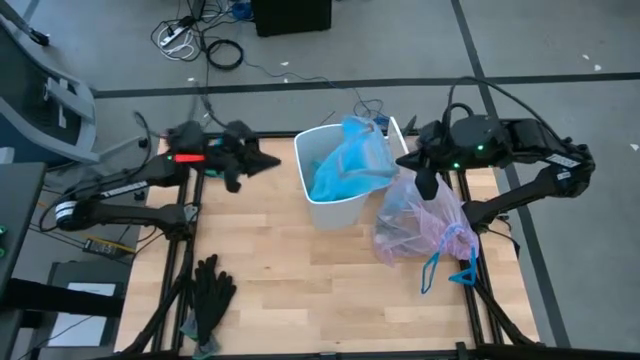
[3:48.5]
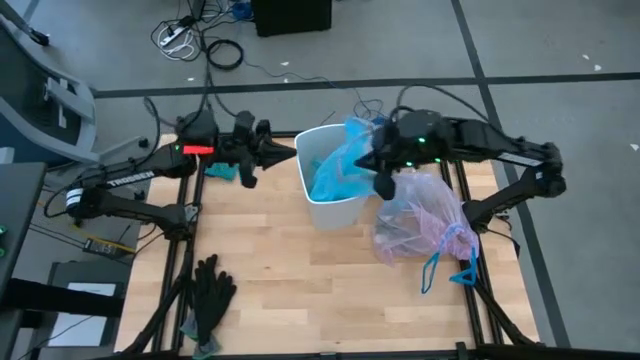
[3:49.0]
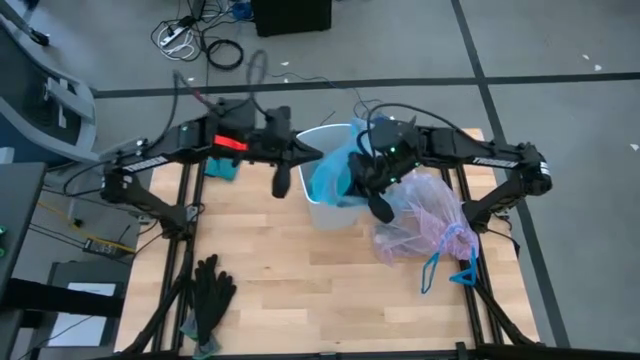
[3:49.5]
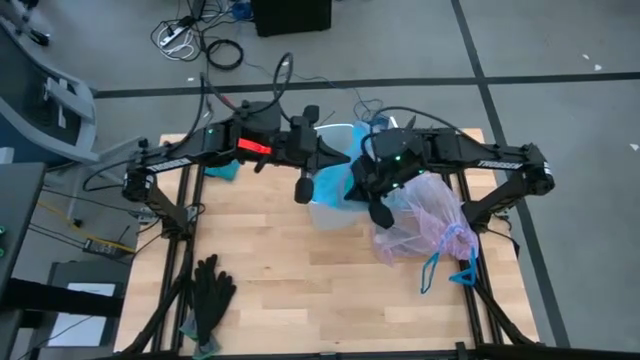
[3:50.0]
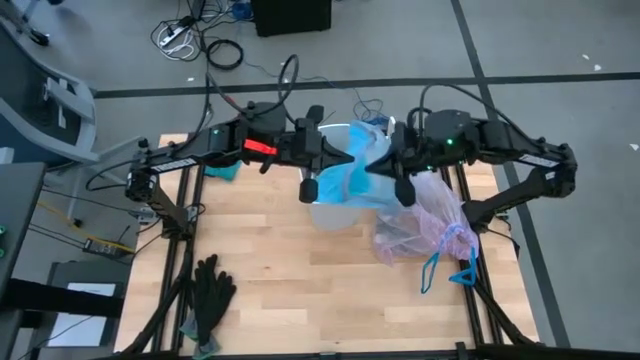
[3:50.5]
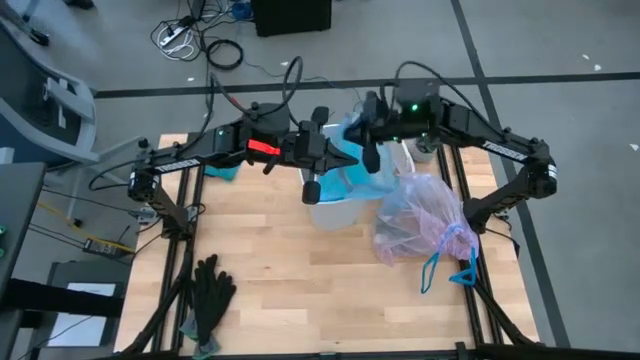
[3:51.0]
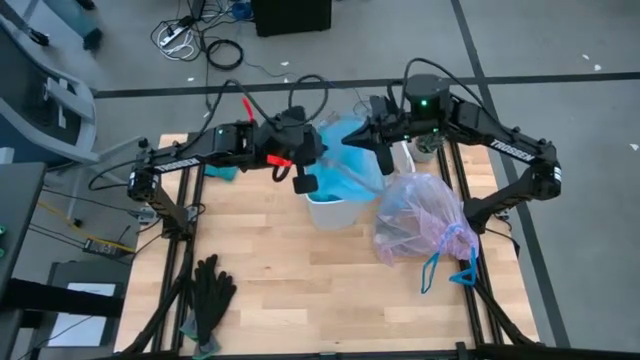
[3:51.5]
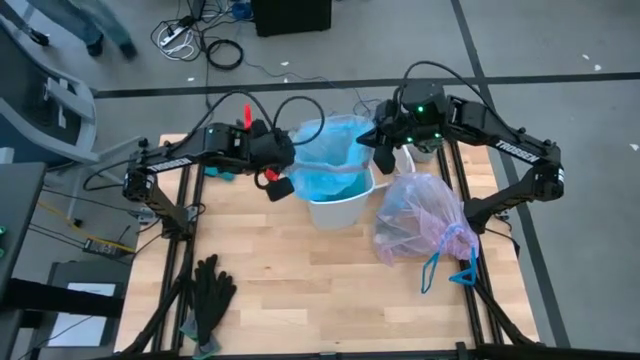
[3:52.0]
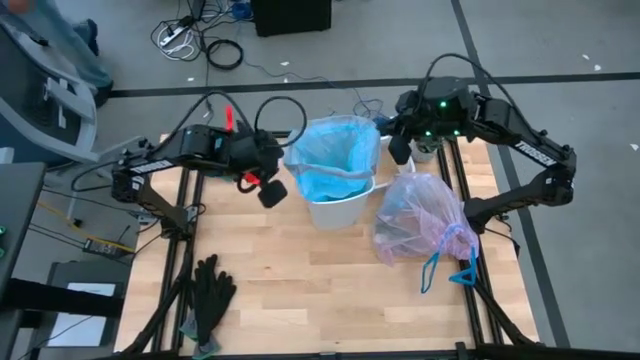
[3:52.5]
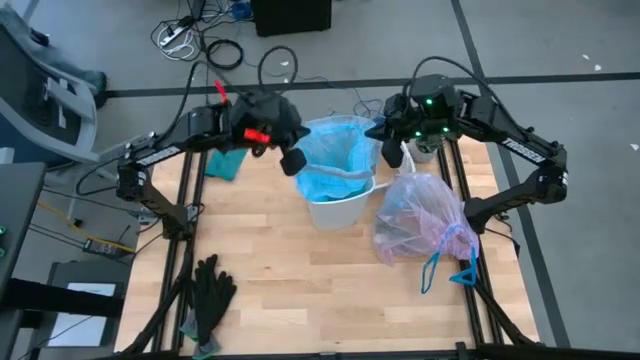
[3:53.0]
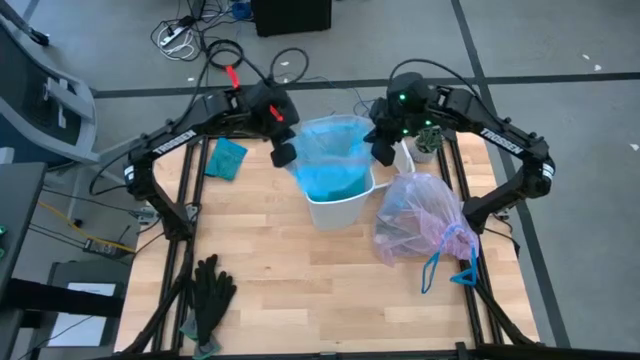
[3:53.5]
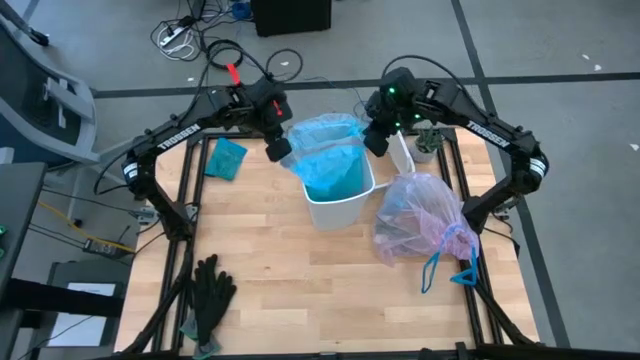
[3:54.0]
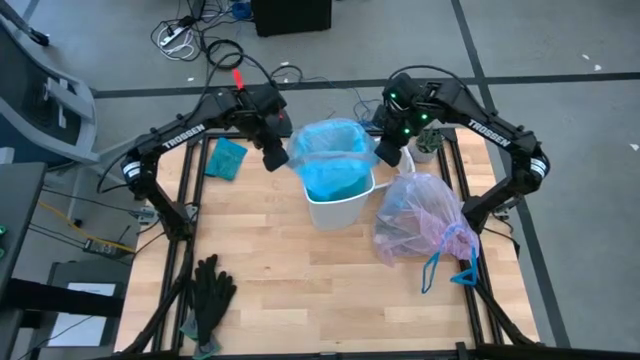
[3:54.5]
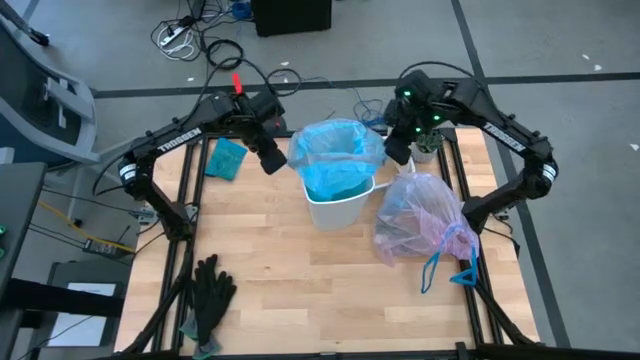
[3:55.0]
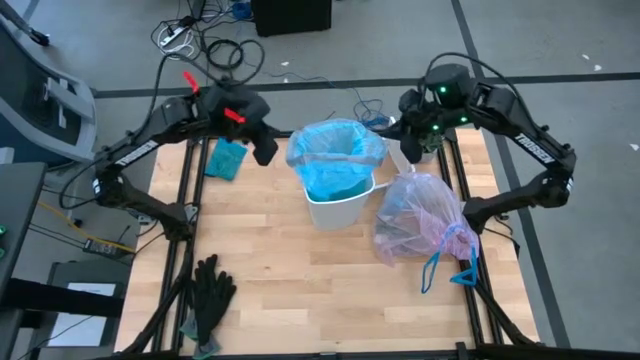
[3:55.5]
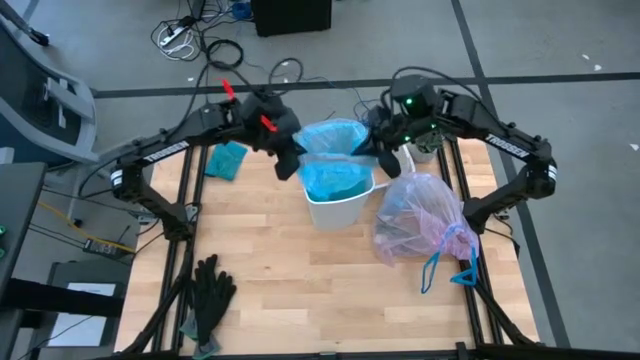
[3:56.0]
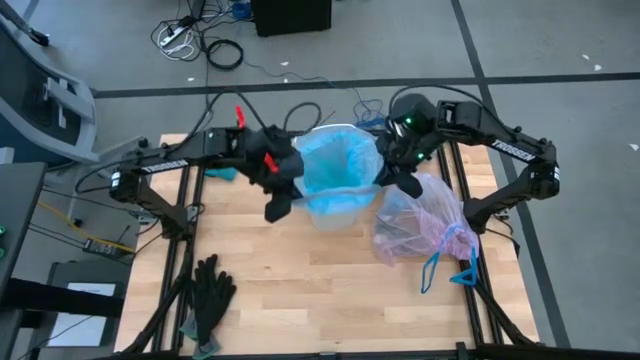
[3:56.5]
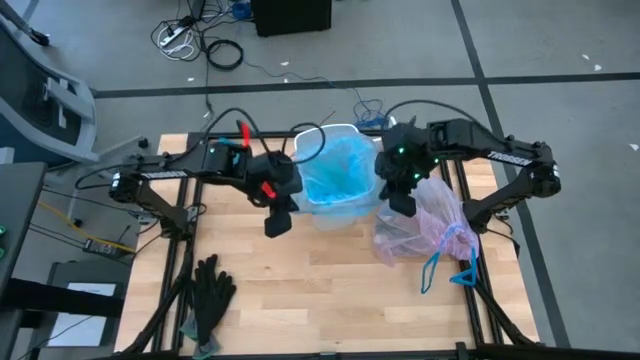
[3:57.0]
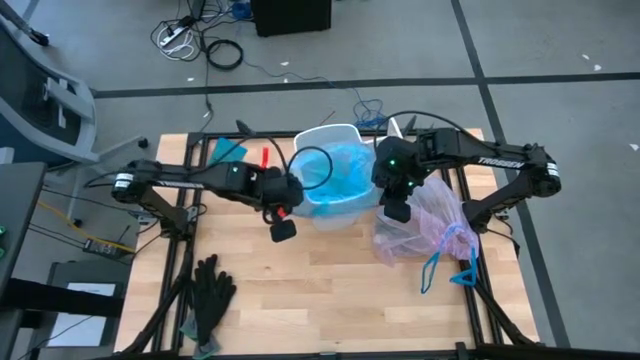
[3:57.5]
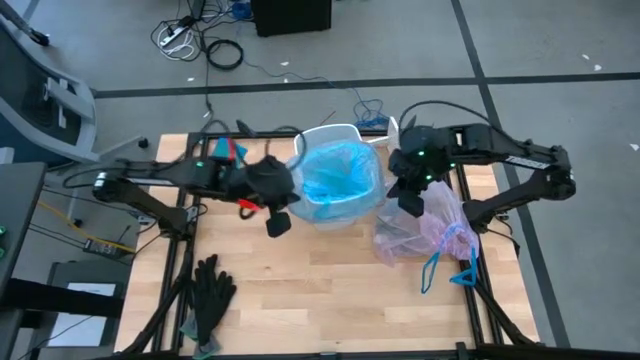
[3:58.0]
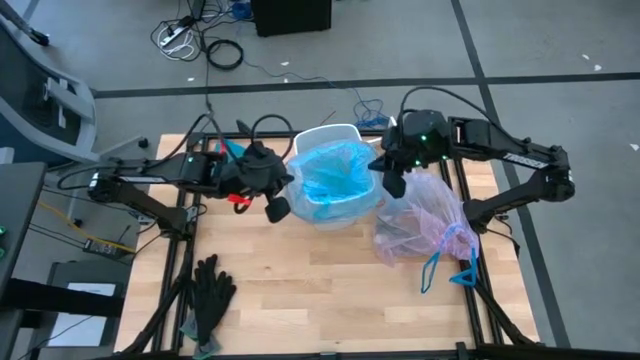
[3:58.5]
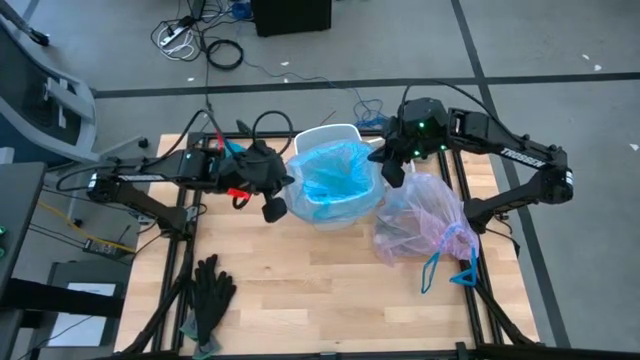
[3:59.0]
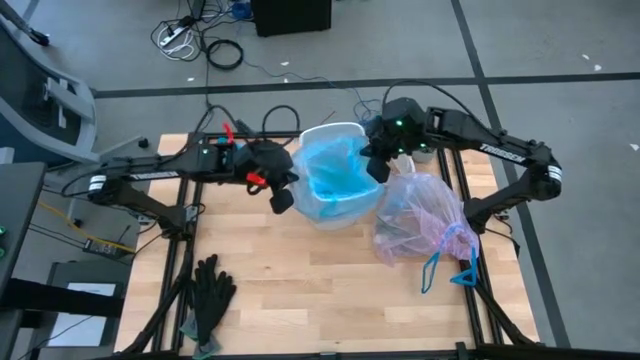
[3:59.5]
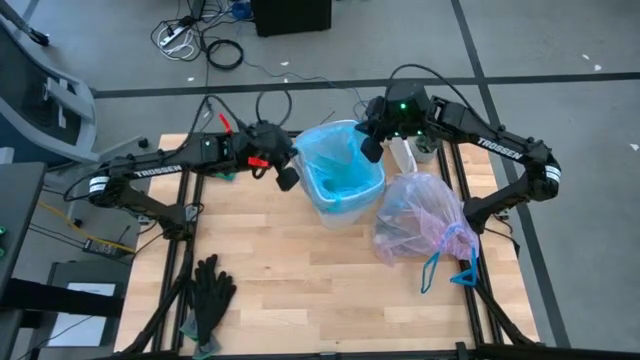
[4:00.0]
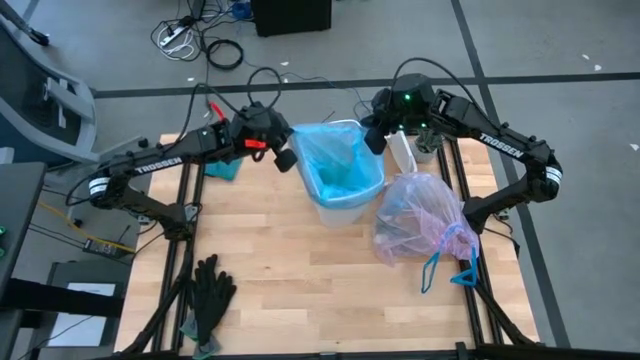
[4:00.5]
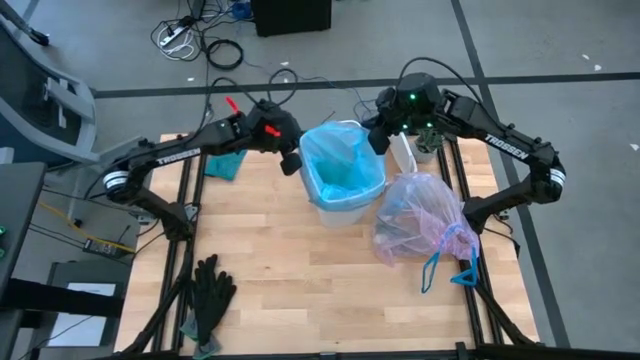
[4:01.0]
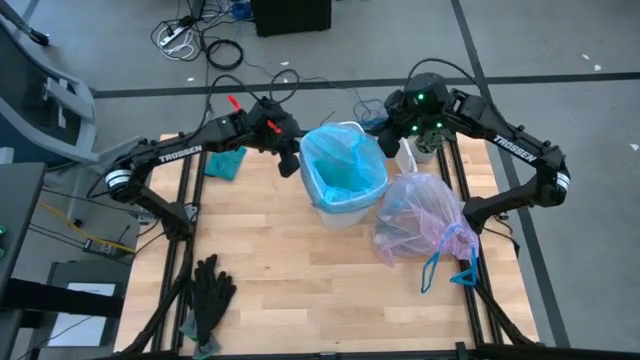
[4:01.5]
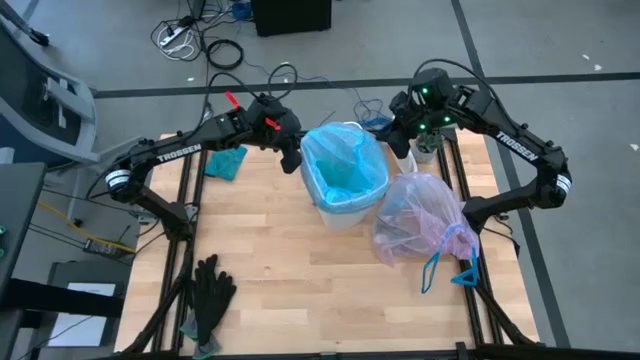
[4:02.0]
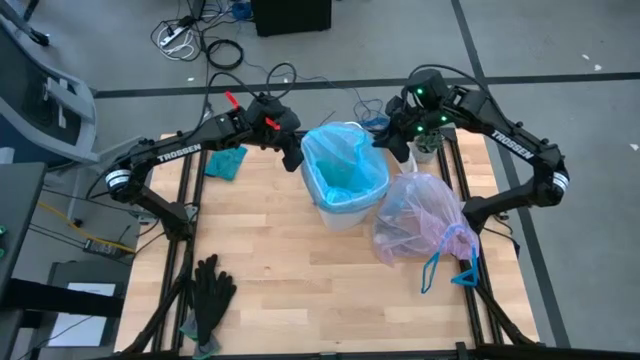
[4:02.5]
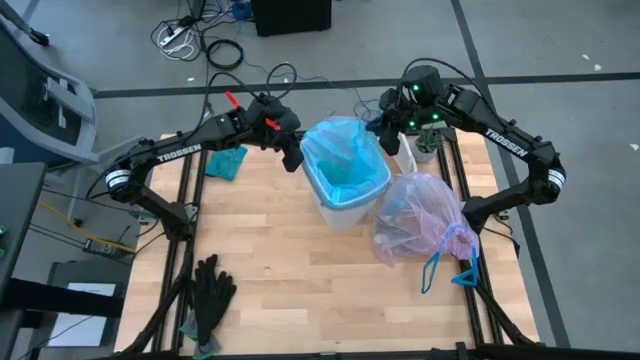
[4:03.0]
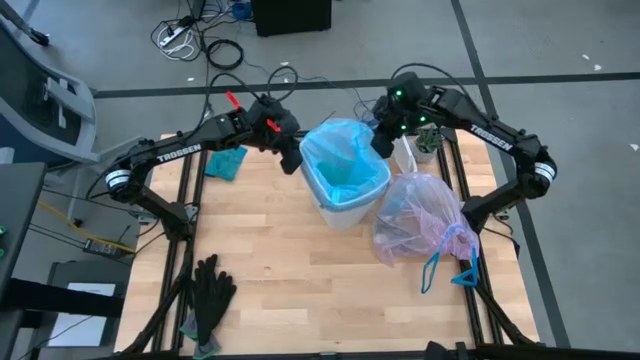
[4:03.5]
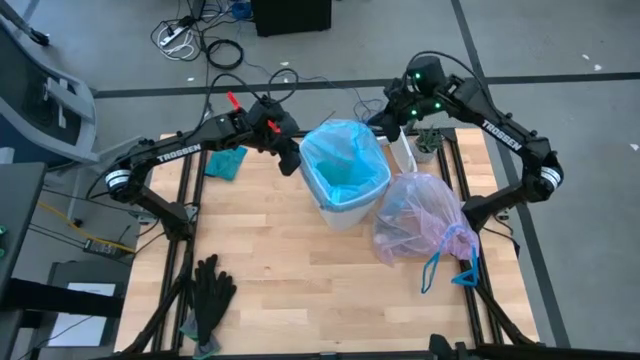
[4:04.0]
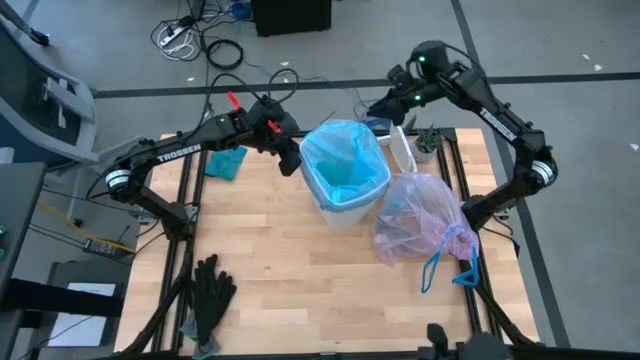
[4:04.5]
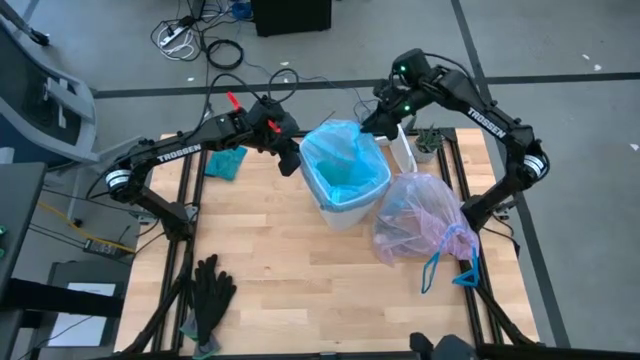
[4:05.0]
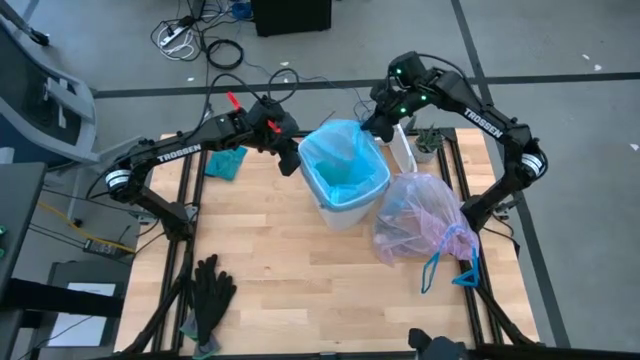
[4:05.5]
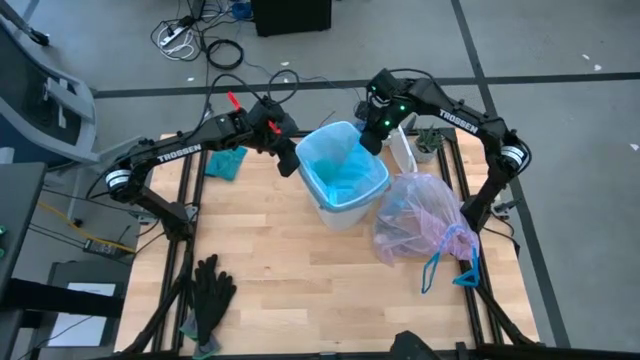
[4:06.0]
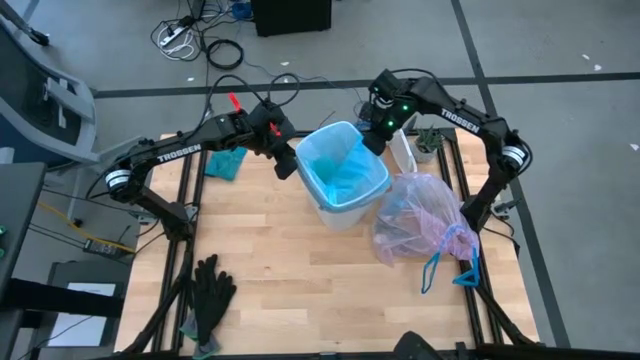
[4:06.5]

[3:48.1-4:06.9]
Task: place trash/remove bag and relplace
Put the blue trash bag in the trash bin

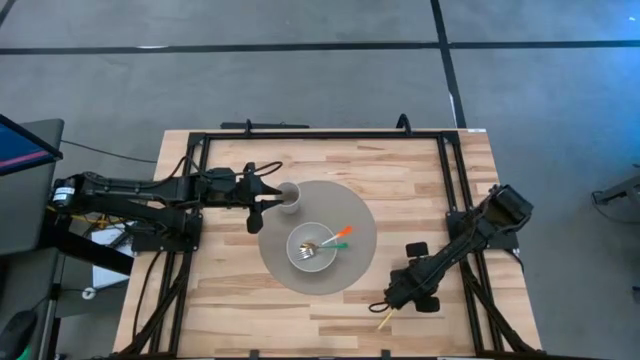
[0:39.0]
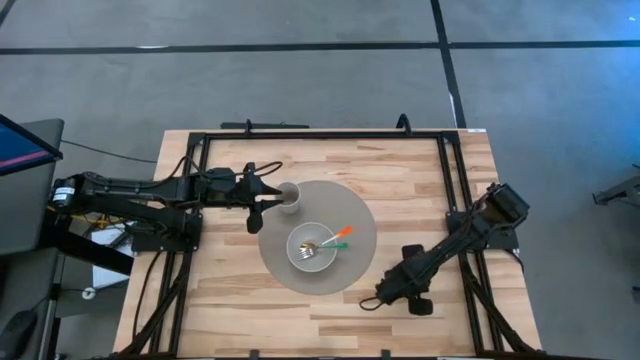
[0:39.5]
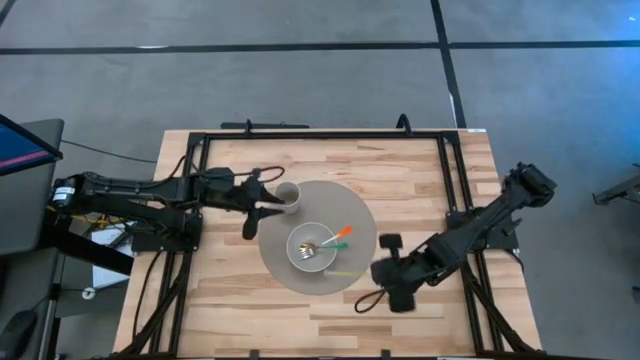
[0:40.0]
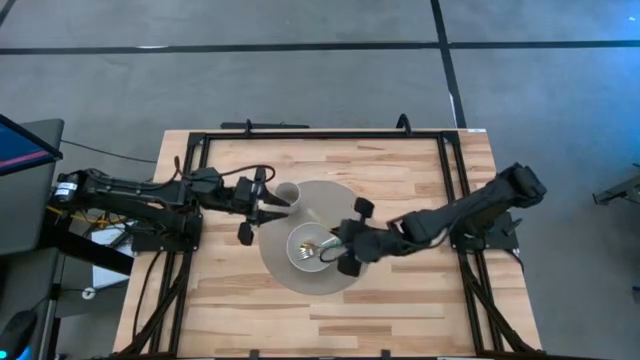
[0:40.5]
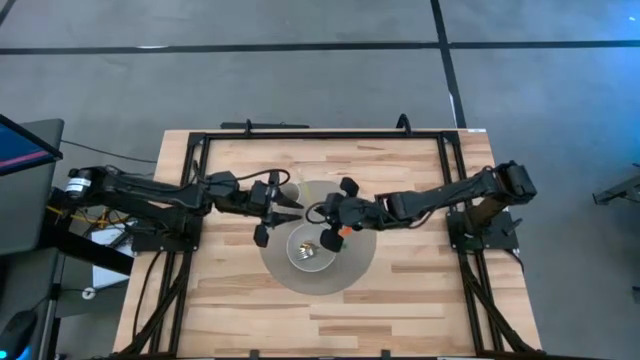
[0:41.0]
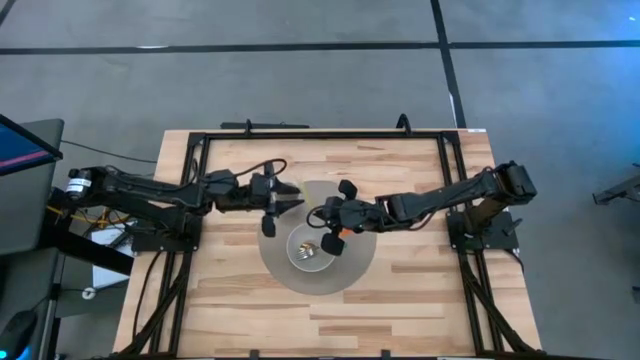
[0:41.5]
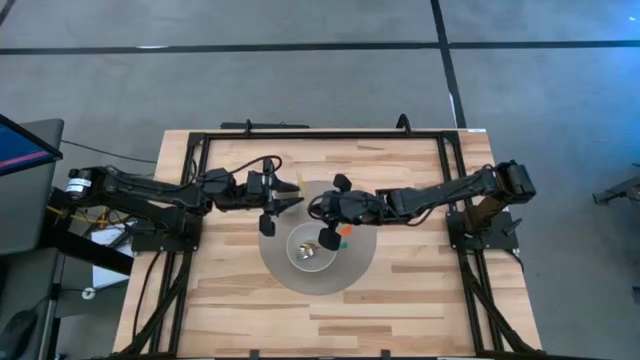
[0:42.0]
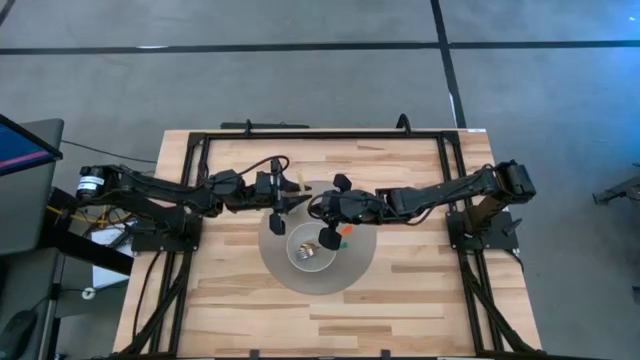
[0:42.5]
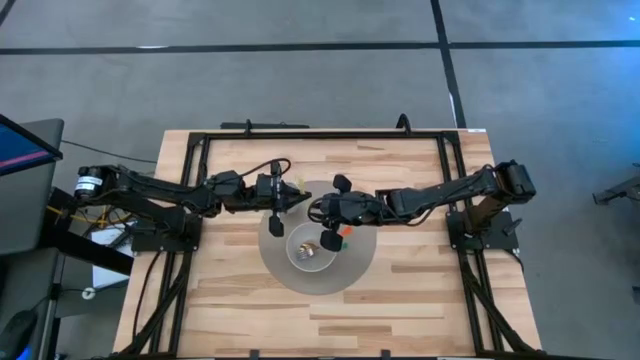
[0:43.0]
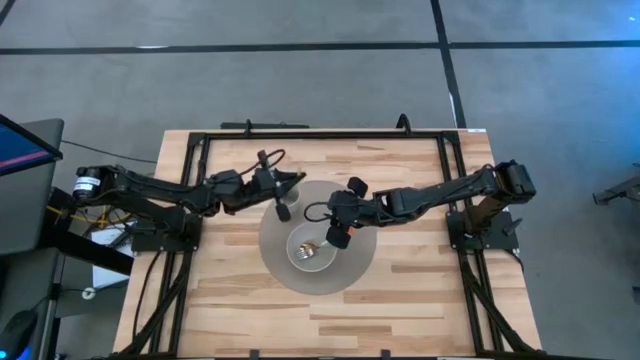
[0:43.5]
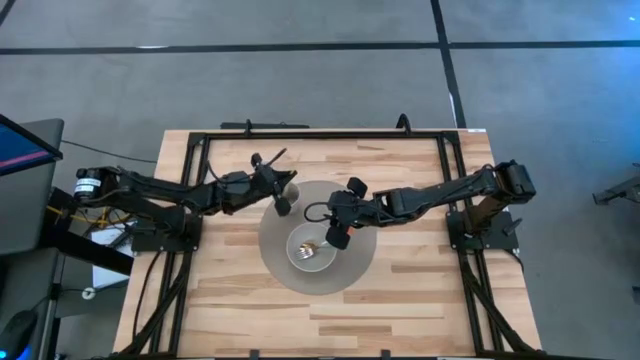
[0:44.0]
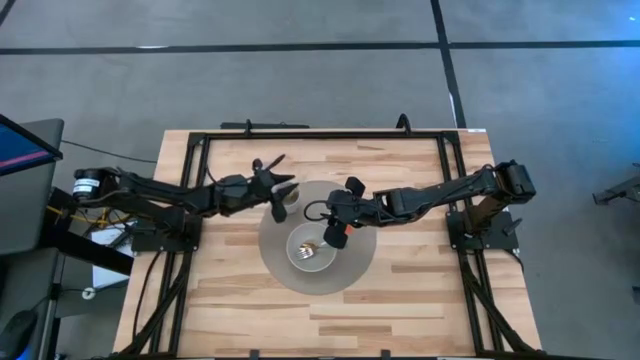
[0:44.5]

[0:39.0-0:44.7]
Task: Pick & Place Utensil
Put the yellow straw into the gray cup on the gray placemat
